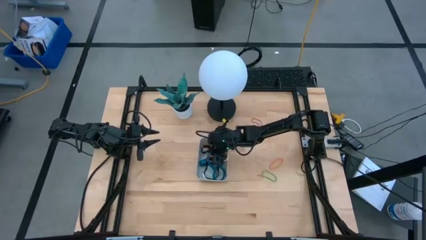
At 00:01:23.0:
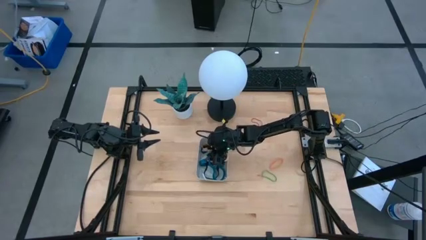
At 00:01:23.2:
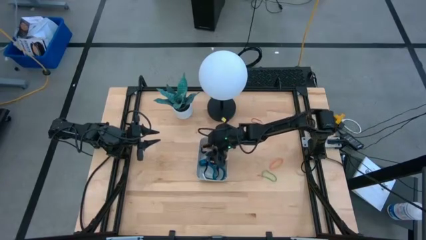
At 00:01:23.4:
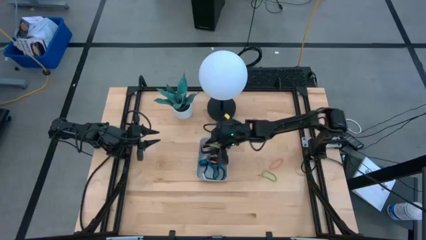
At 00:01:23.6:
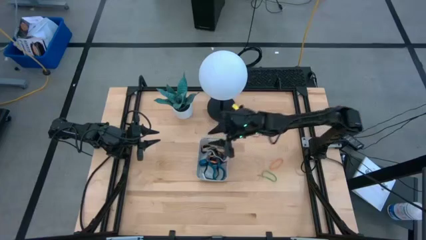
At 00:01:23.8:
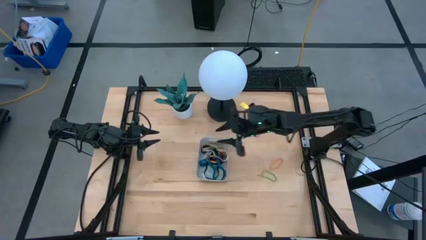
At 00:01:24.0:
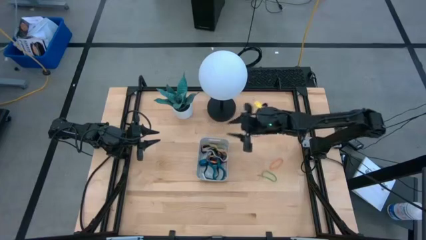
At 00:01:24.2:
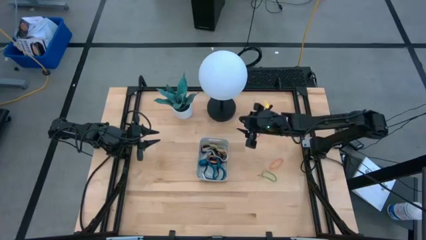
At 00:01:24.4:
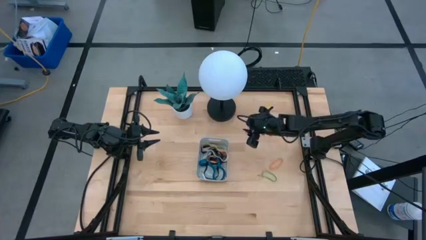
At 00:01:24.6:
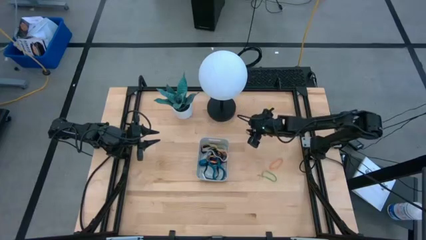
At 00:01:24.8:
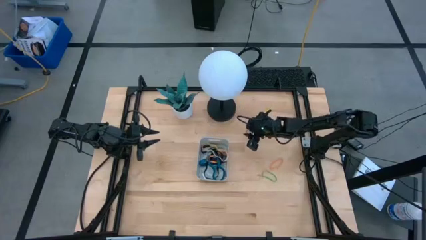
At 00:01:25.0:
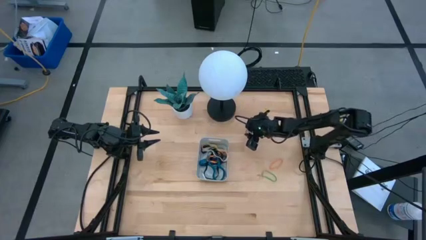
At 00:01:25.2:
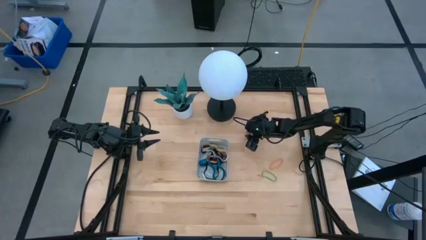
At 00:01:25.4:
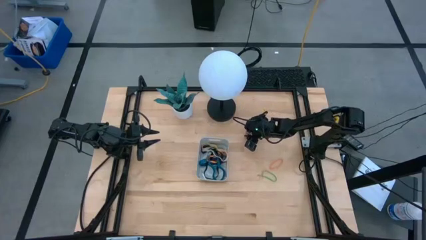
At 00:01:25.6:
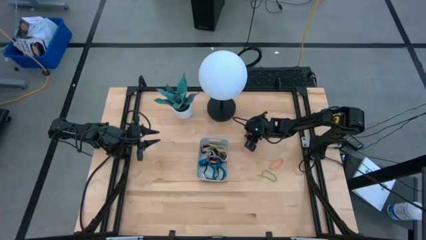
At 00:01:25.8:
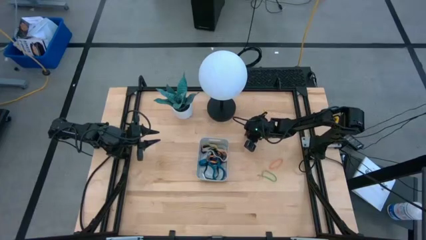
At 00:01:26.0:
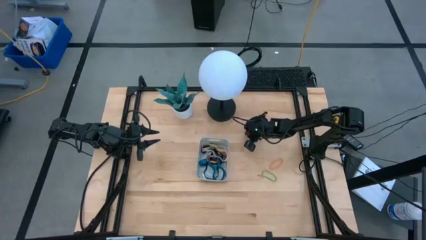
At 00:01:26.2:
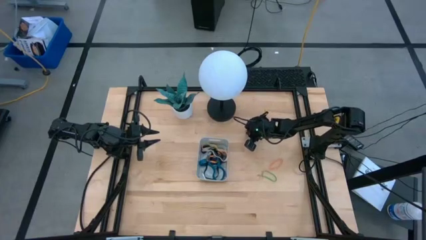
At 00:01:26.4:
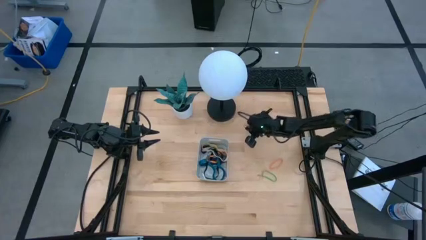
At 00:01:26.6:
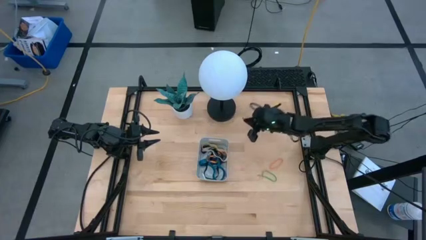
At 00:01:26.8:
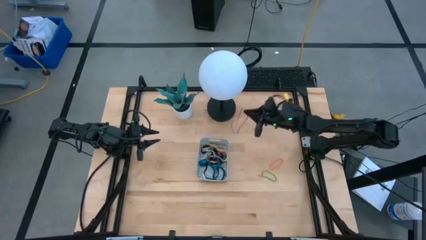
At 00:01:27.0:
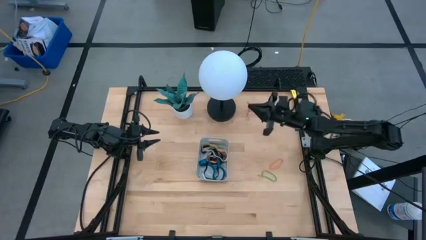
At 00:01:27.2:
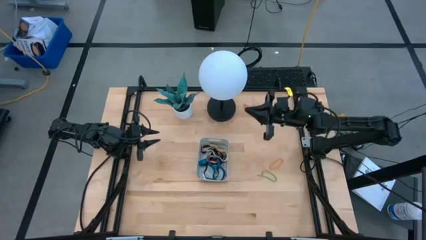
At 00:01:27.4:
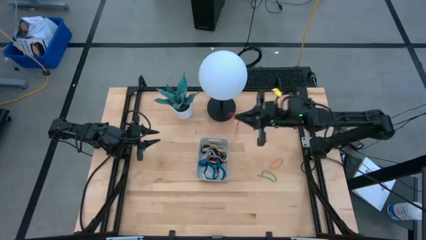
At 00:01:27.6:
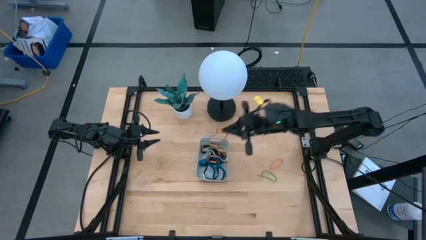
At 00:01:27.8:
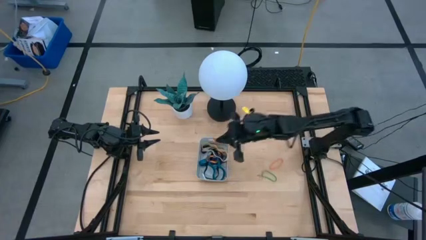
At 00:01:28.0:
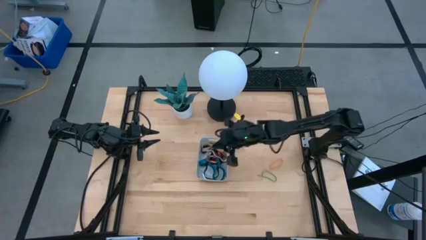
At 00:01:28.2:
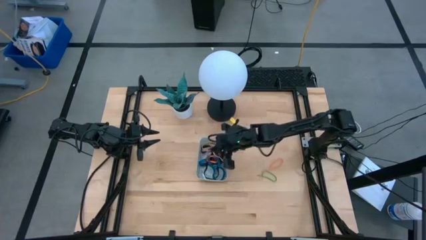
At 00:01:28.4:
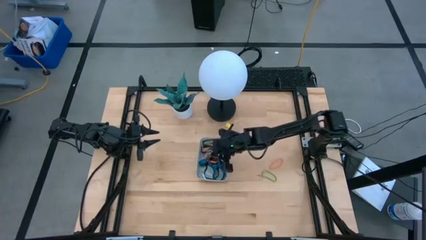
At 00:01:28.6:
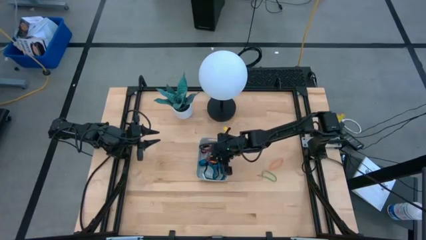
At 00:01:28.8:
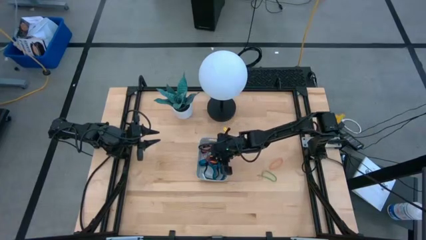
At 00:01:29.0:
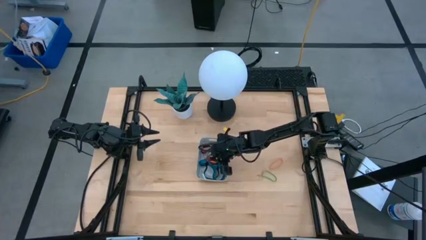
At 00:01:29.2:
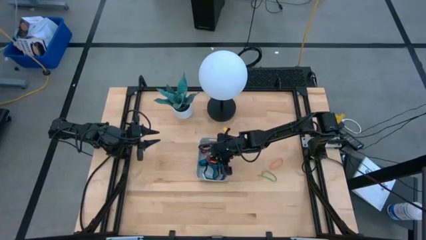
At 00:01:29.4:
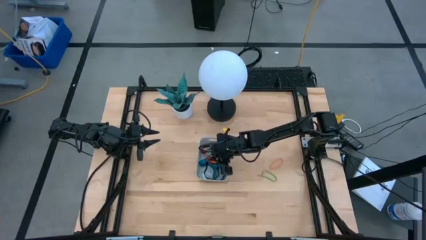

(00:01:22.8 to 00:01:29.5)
Task: Pick and place rubber bands into bin
Put the red rubber band into the gray bin

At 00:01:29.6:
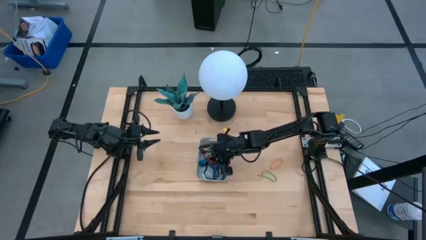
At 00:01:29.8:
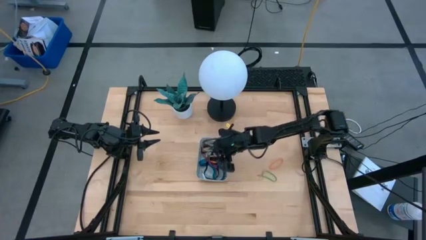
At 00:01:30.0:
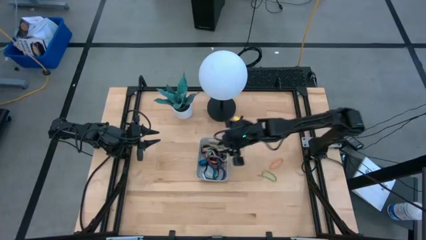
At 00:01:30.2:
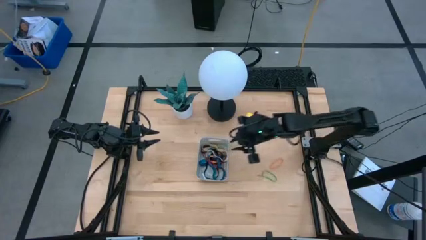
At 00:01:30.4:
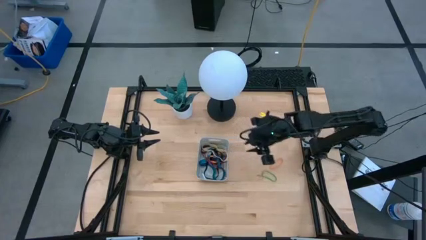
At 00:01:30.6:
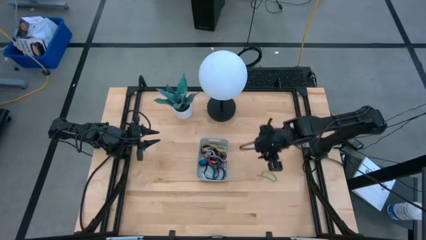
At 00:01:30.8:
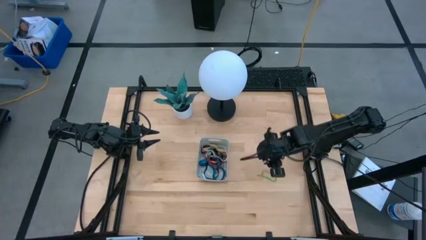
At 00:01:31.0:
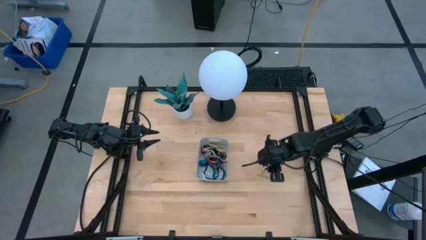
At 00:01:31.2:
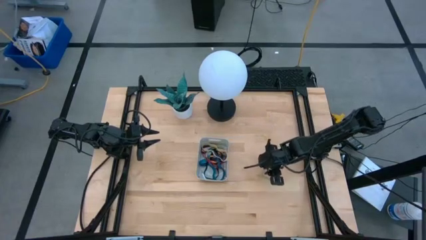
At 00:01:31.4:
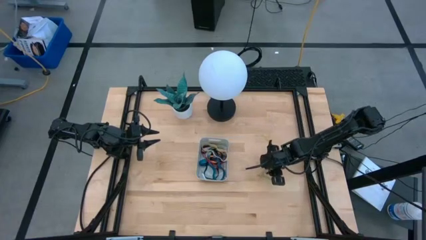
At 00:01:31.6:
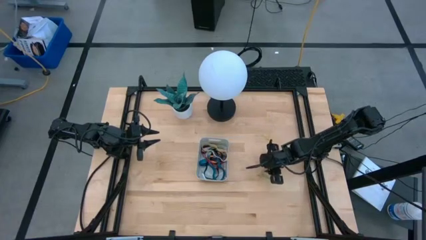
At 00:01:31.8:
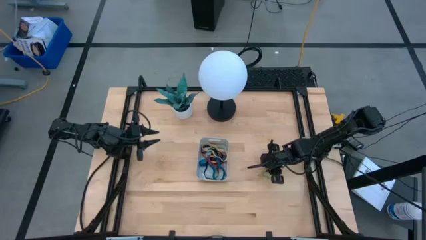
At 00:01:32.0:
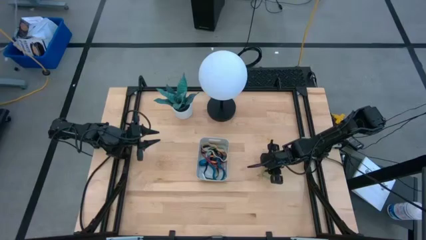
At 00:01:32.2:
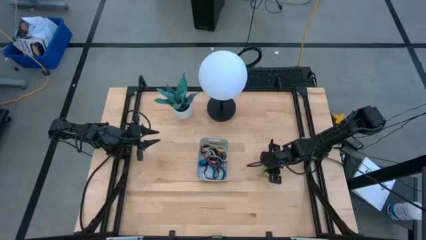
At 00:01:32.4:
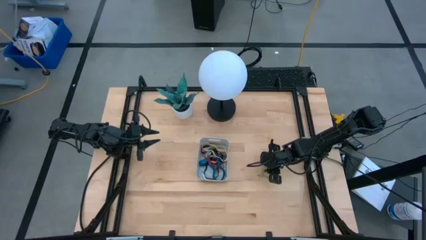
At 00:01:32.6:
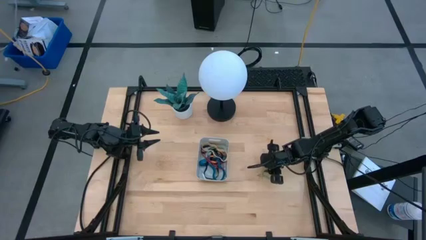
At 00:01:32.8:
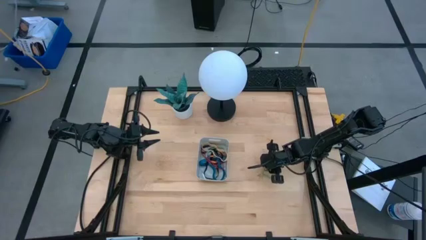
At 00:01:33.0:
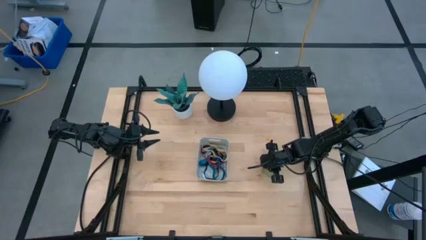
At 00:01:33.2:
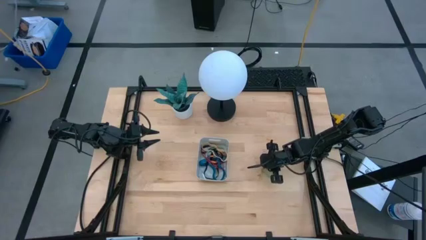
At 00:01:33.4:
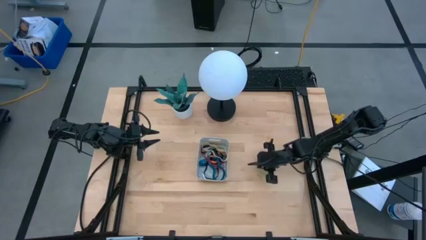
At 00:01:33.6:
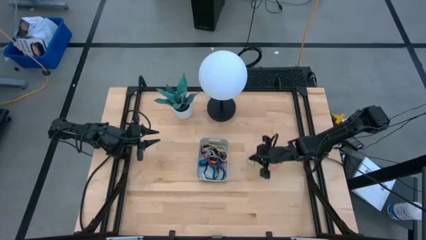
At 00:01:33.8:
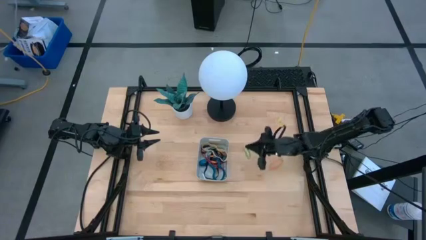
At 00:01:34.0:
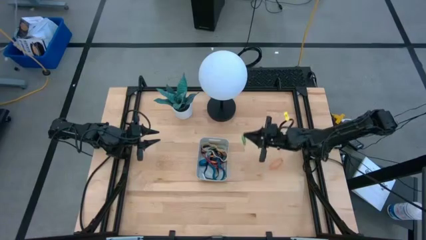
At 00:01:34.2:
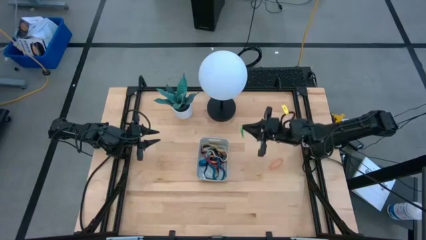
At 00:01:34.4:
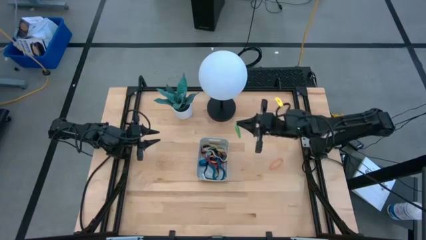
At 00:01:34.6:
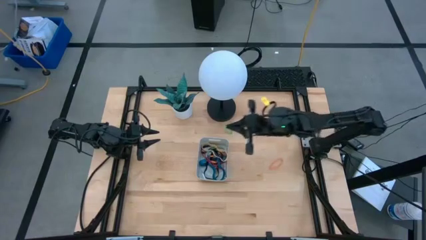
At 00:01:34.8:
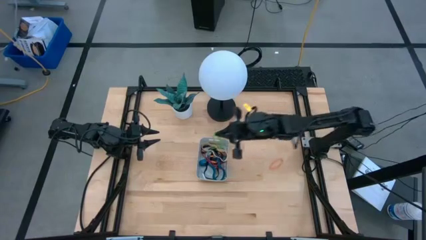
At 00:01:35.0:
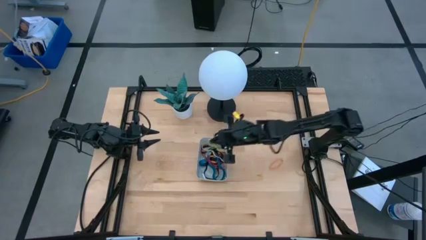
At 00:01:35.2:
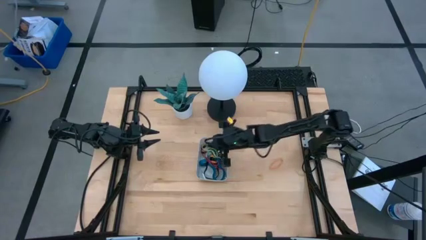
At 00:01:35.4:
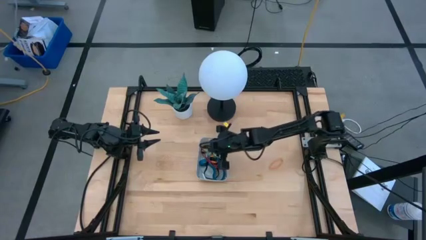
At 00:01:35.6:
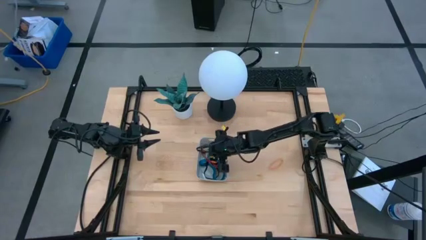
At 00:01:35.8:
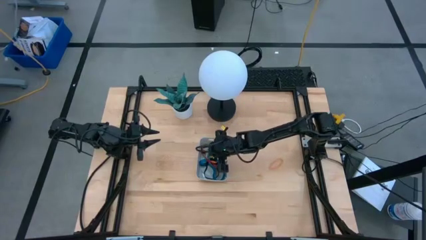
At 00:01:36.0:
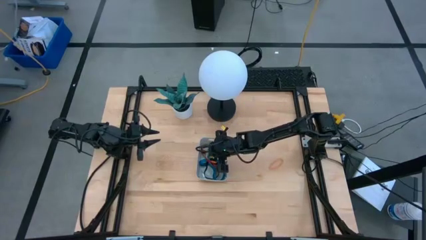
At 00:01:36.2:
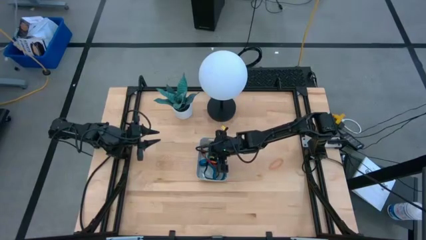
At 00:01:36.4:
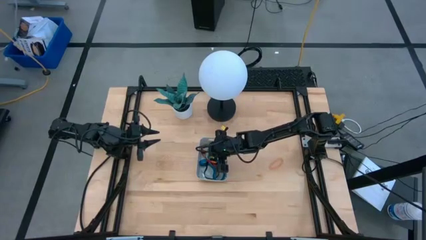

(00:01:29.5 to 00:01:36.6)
Put the green rubber band into the gray bin
